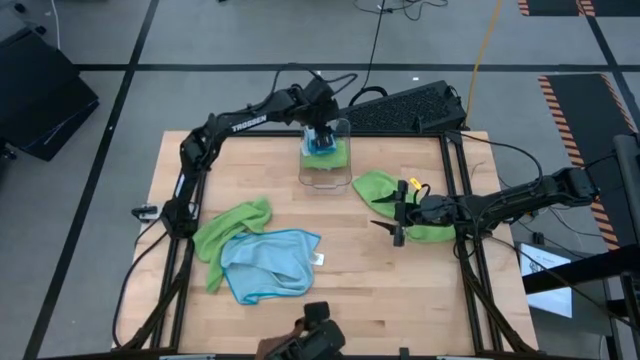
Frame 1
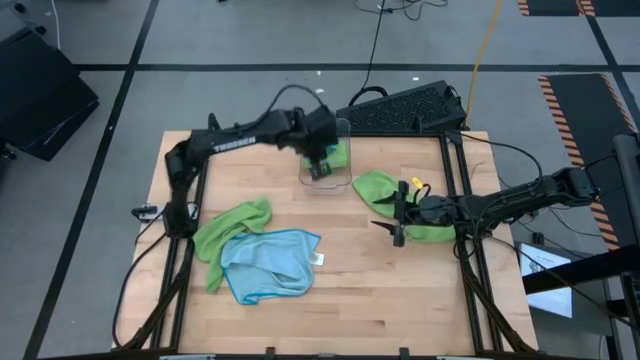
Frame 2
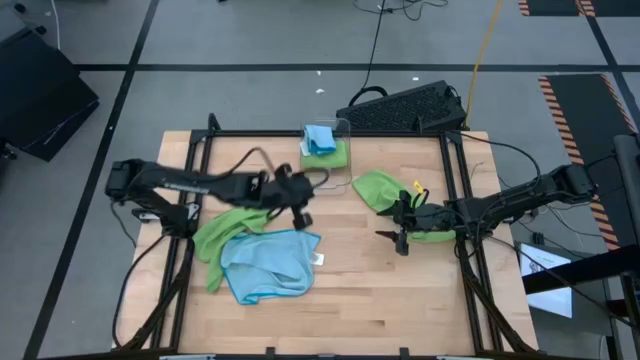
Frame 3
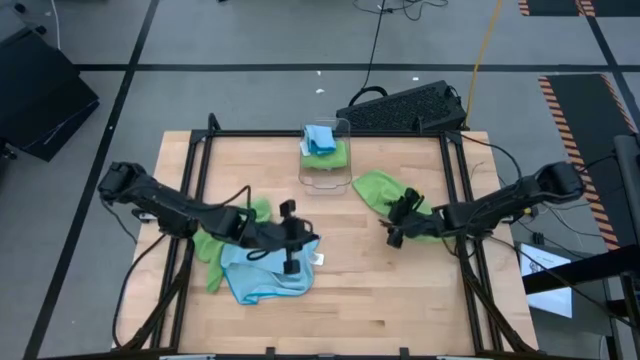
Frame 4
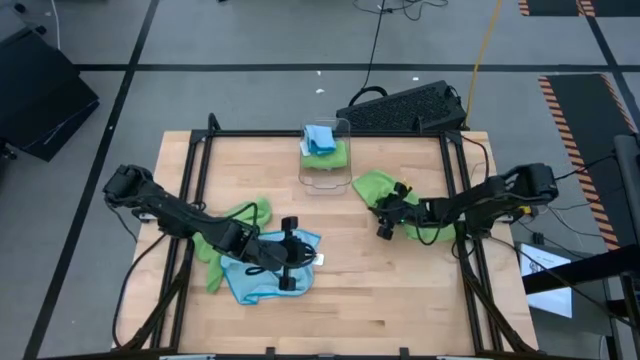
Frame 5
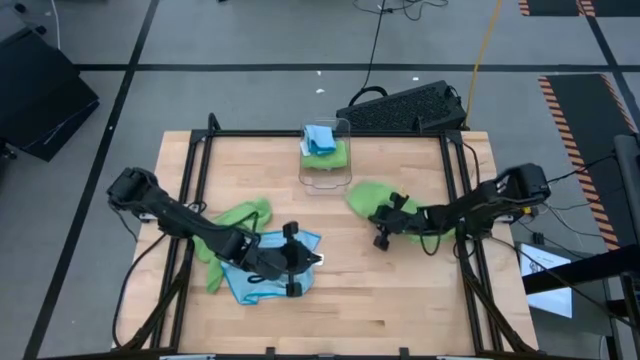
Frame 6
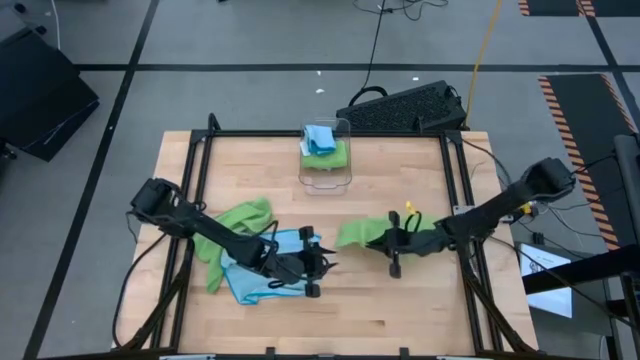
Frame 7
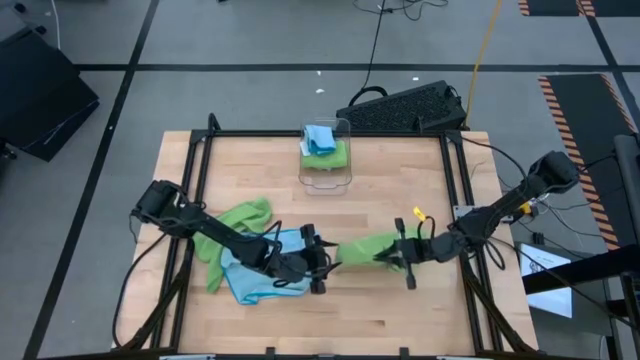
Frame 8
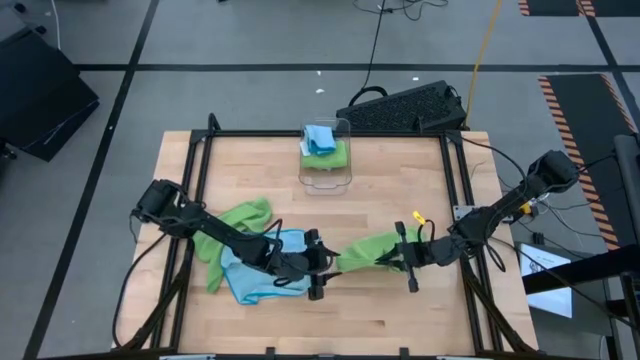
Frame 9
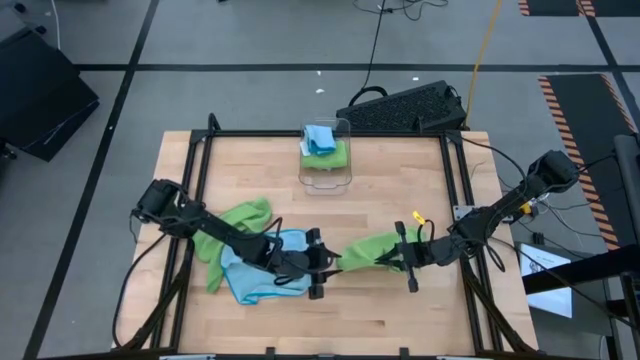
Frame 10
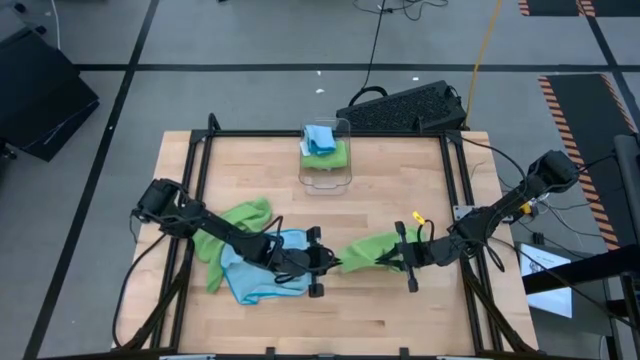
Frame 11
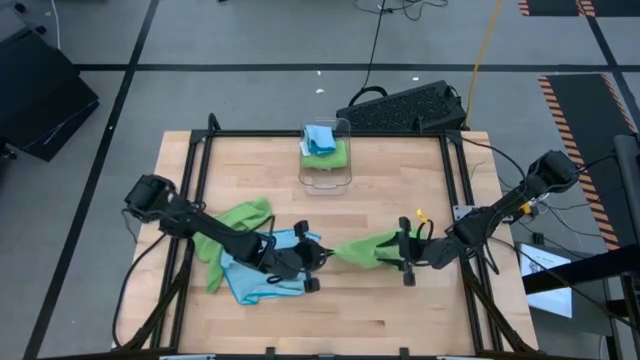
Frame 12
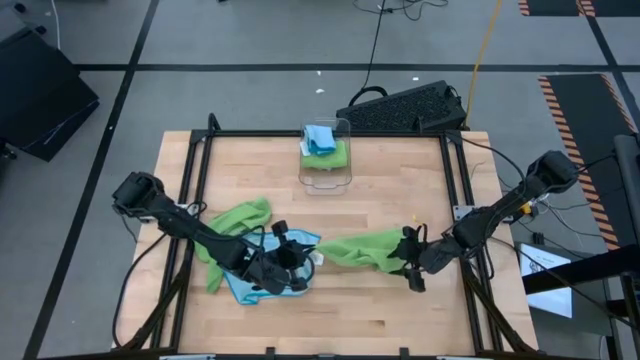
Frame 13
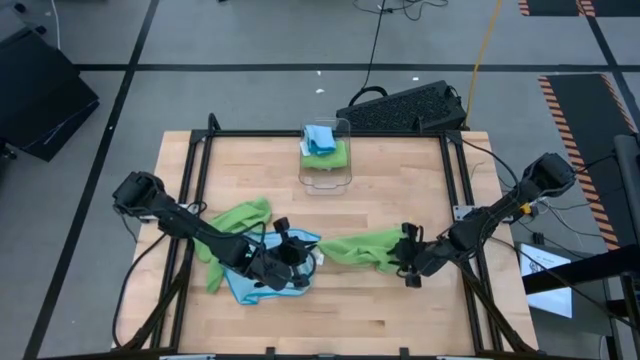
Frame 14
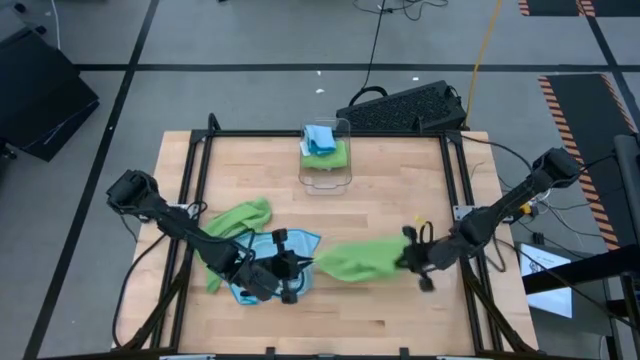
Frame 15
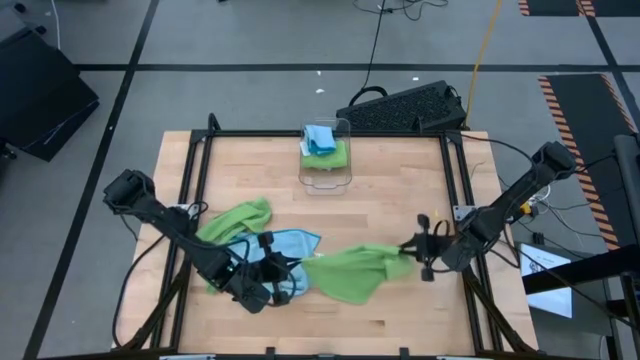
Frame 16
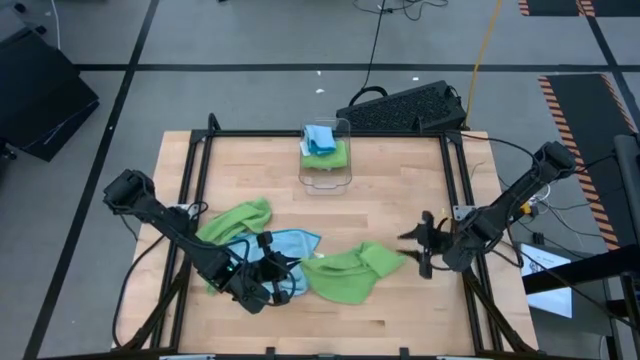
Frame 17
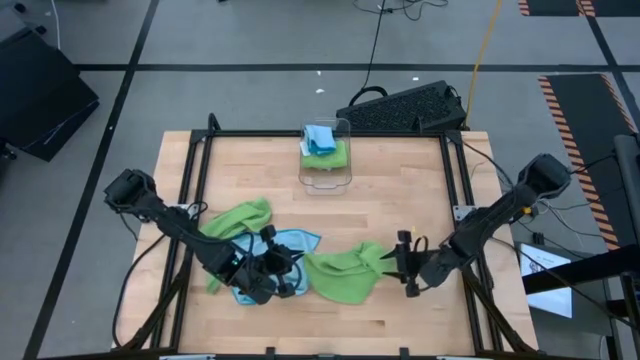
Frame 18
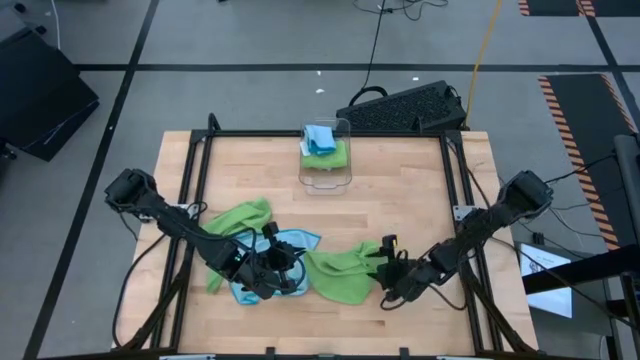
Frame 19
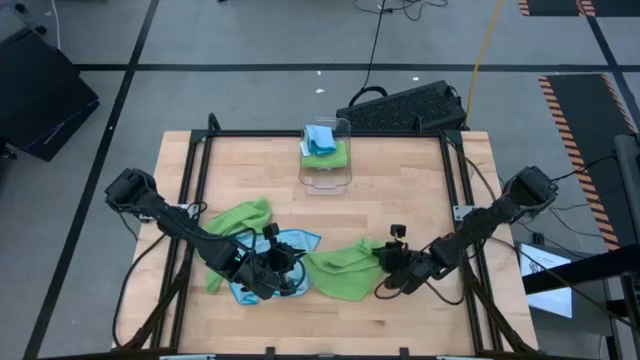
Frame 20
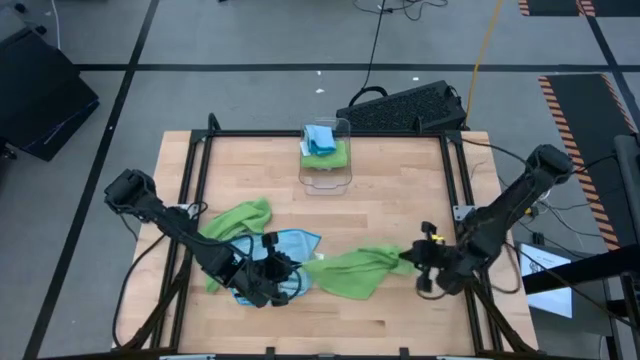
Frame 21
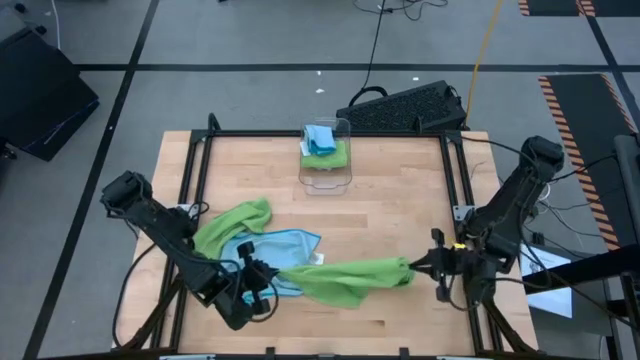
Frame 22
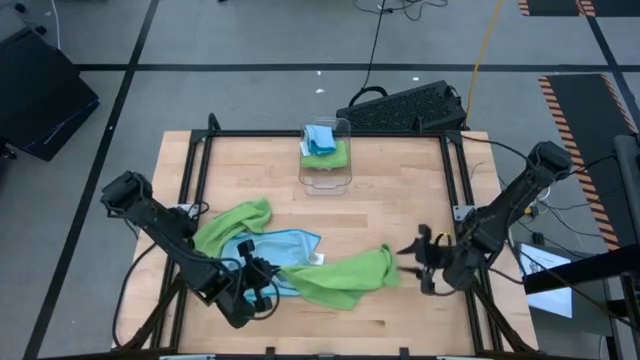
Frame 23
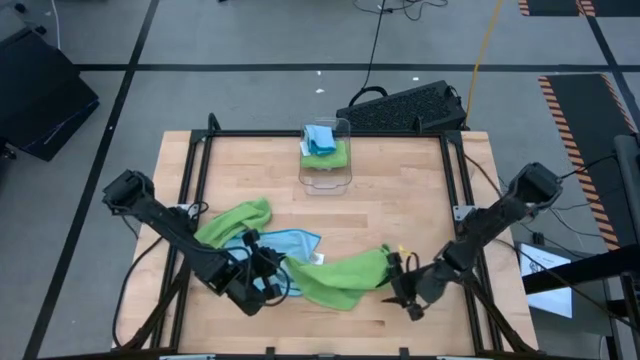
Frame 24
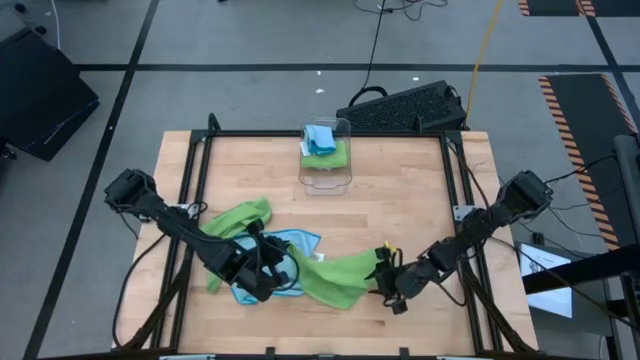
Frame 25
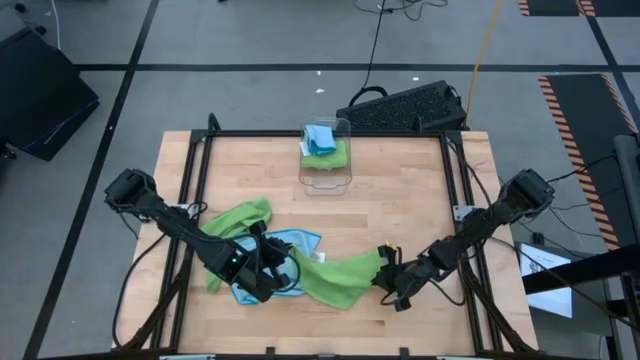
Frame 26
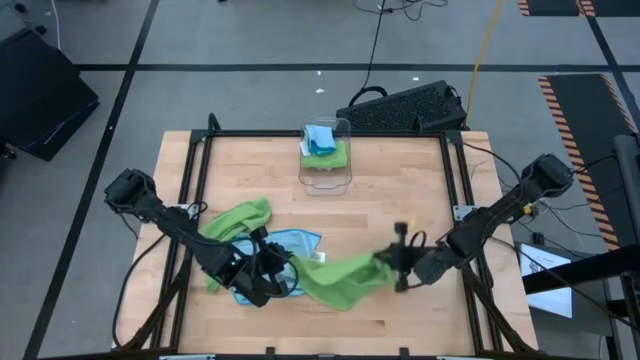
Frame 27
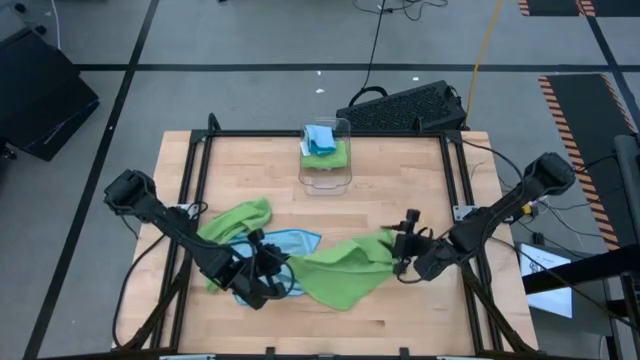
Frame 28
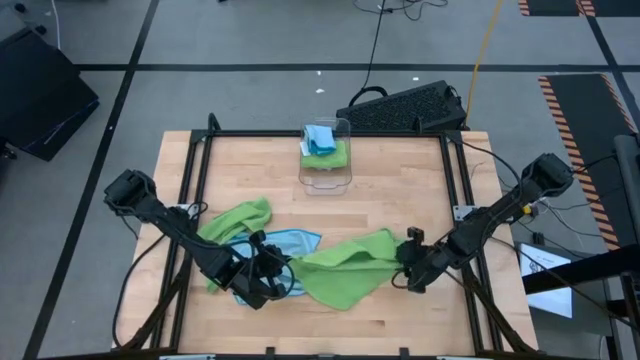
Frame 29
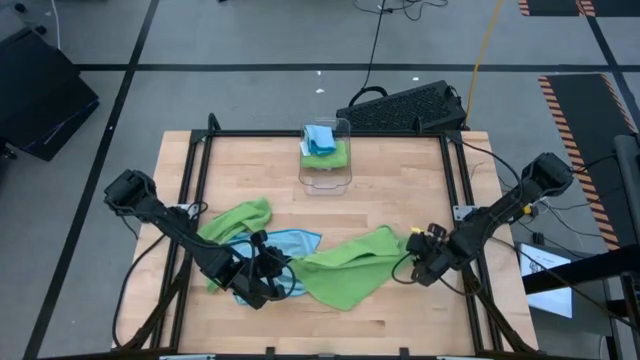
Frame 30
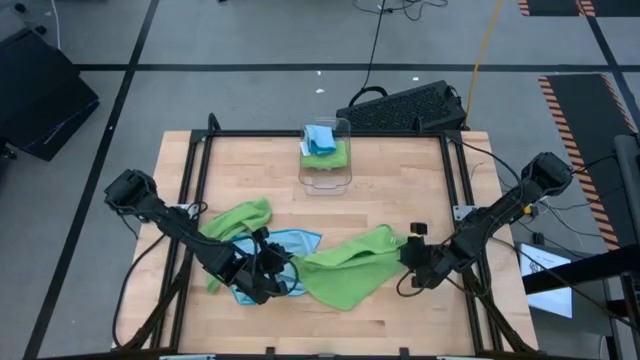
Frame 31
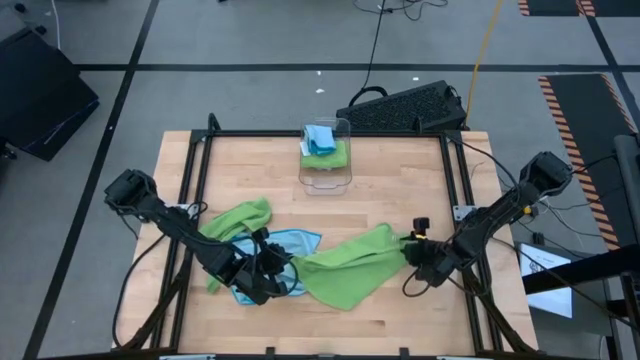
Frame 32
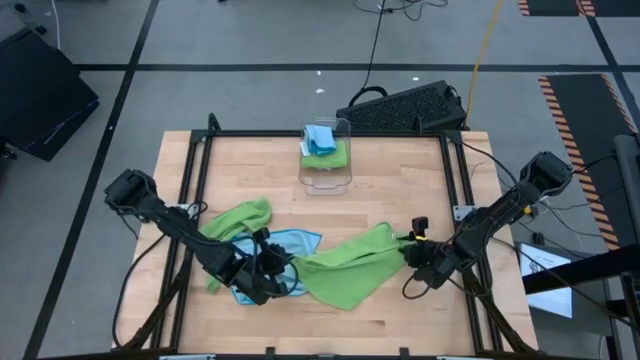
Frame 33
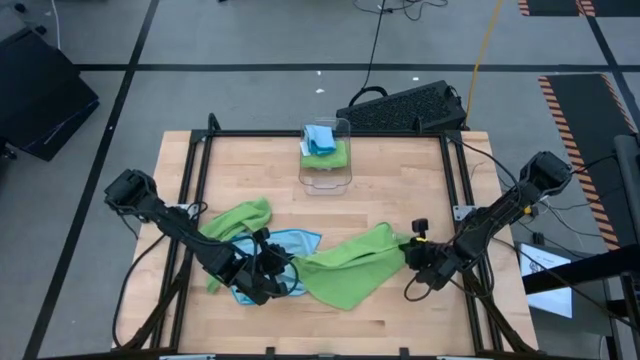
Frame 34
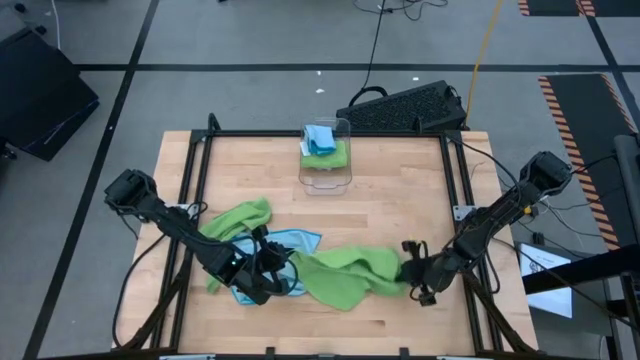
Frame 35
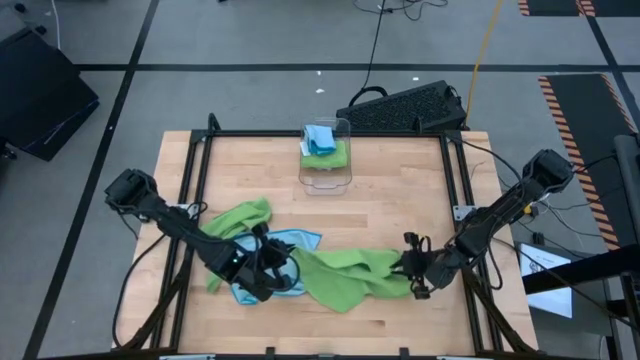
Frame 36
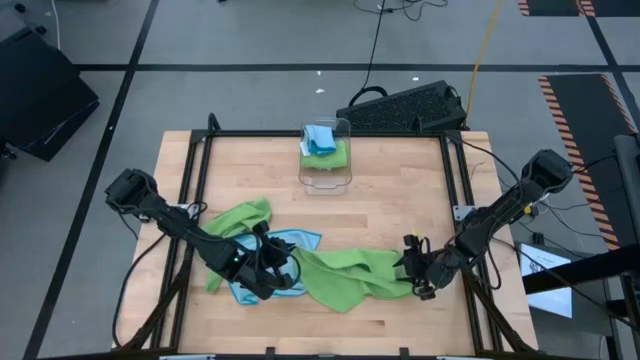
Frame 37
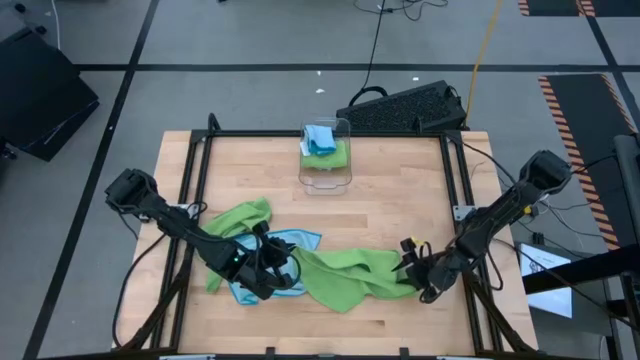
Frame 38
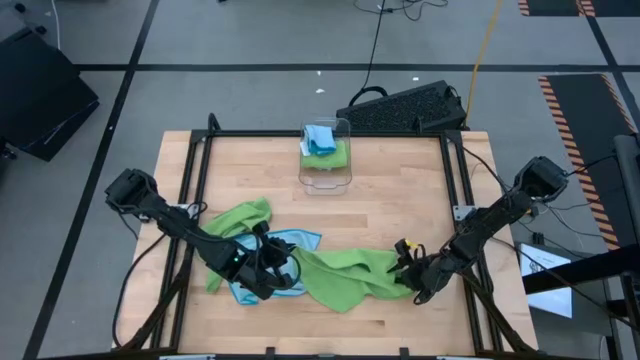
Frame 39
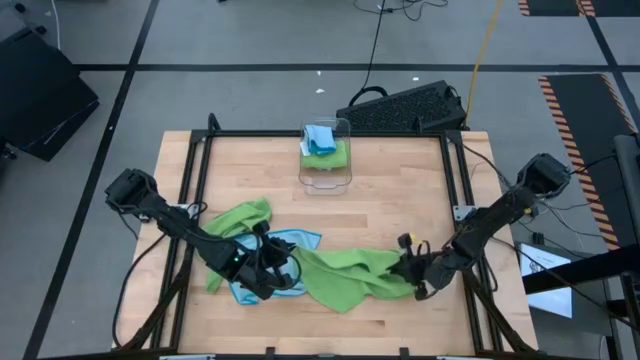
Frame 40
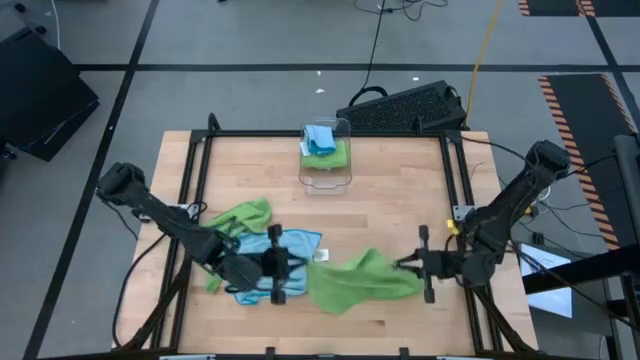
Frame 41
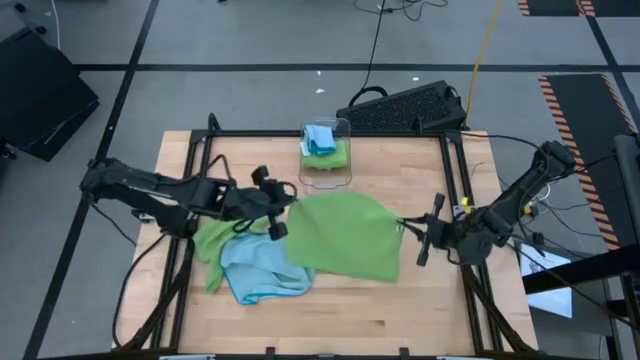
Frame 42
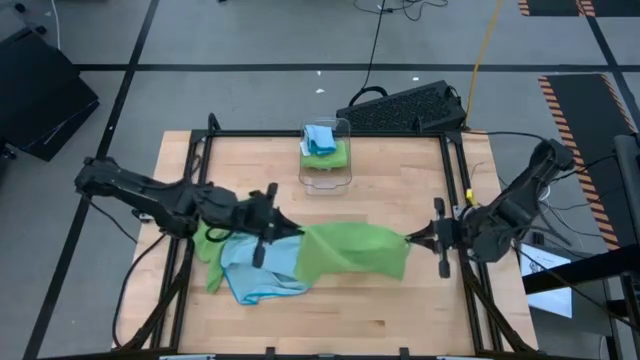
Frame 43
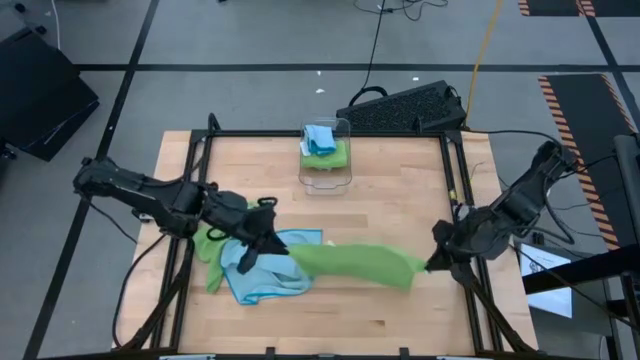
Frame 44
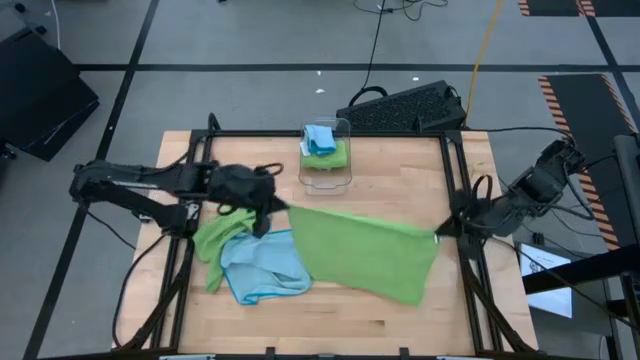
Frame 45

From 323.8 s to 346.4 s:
Task: Fold microfiber towels
Fold the right green towel
